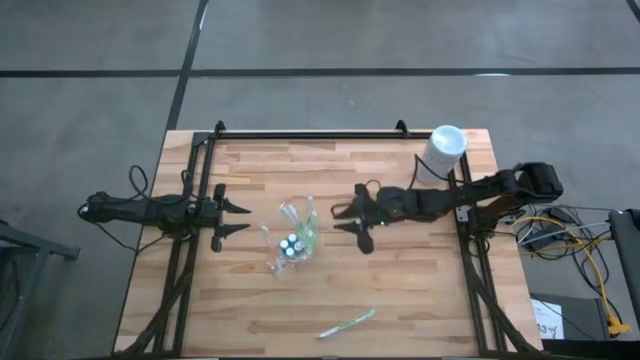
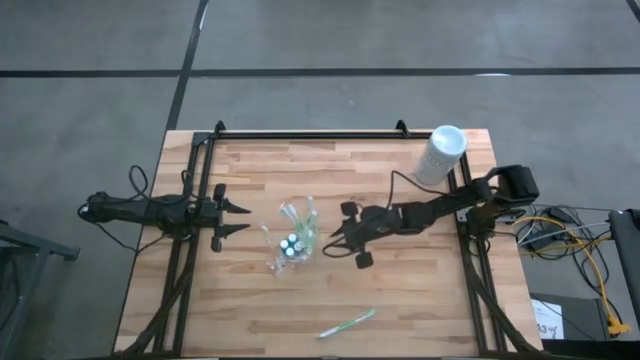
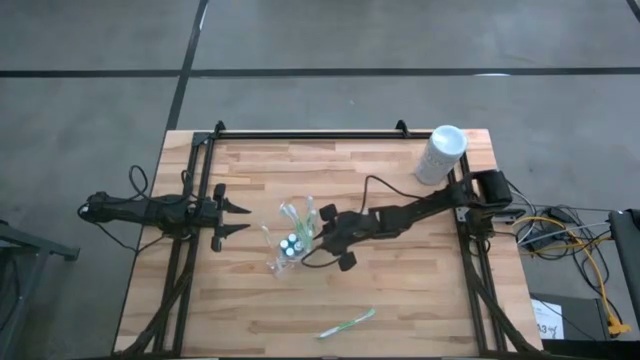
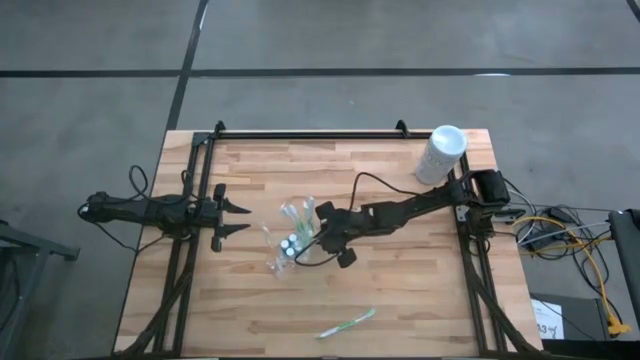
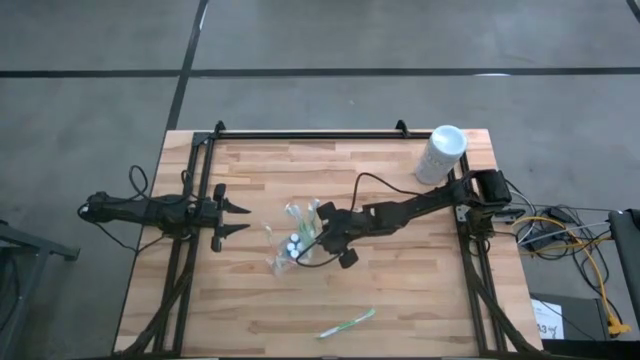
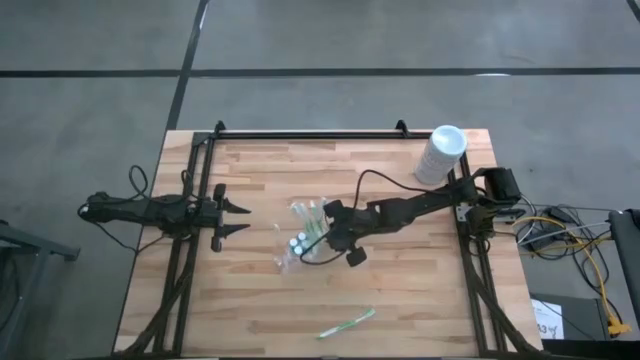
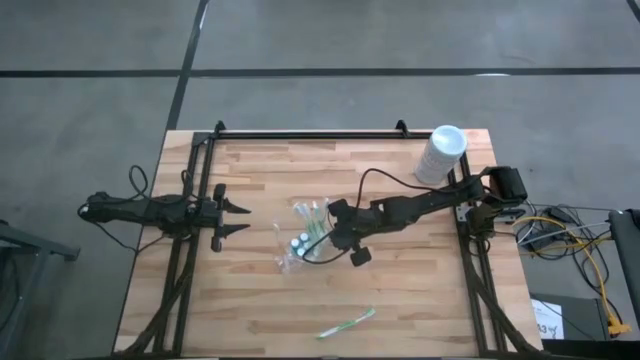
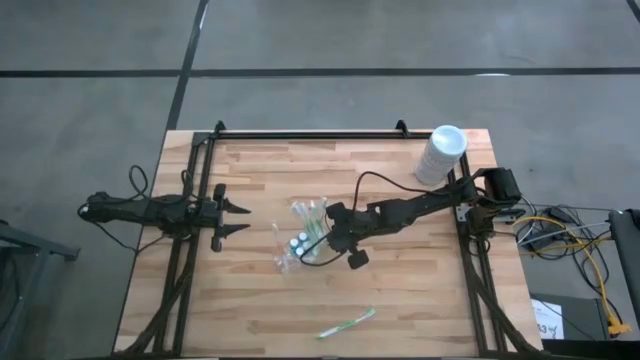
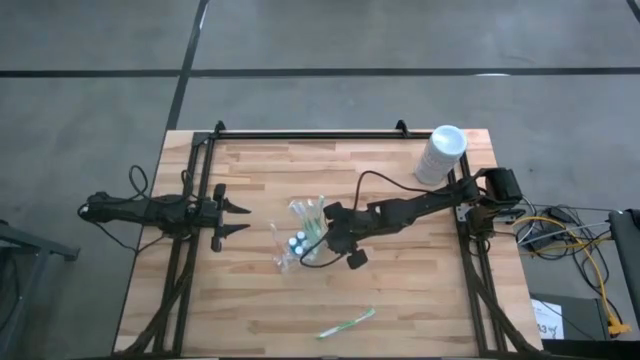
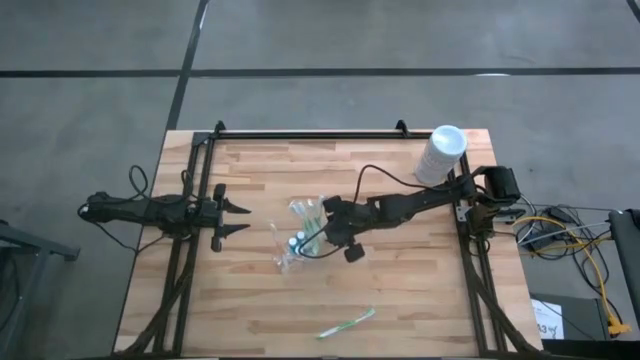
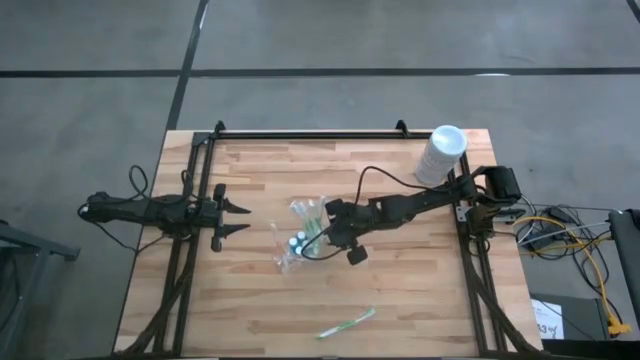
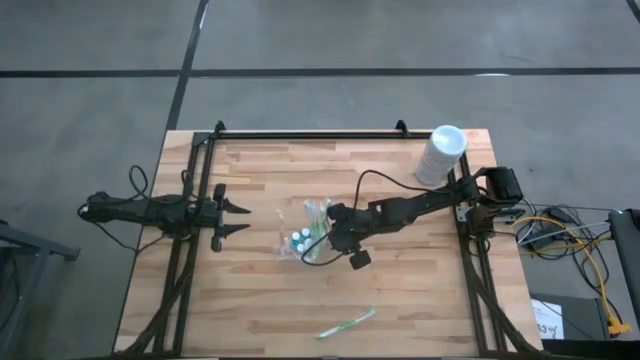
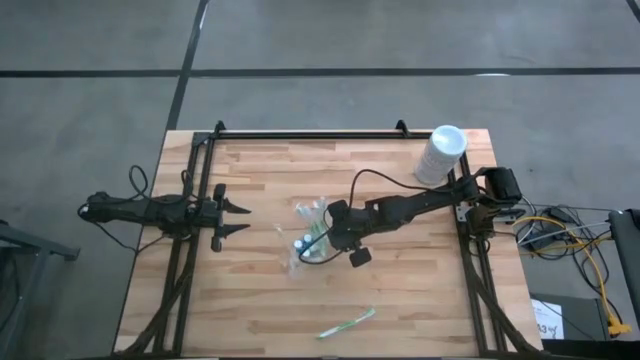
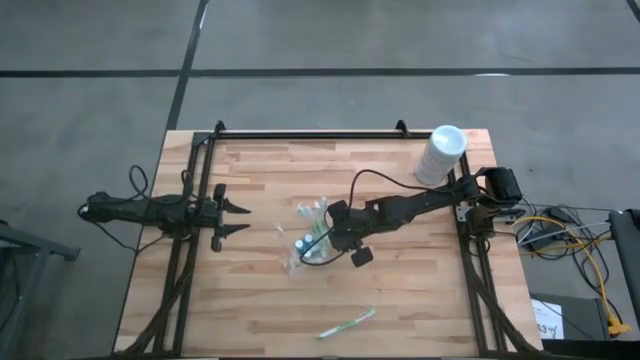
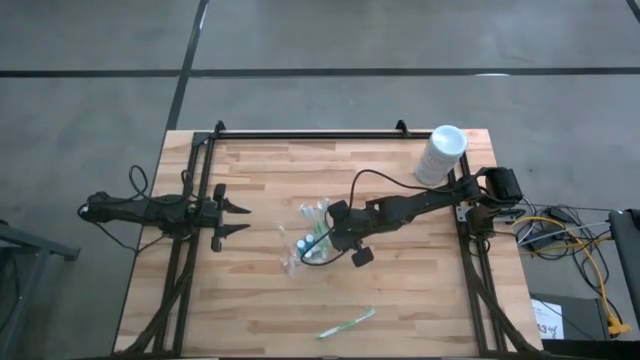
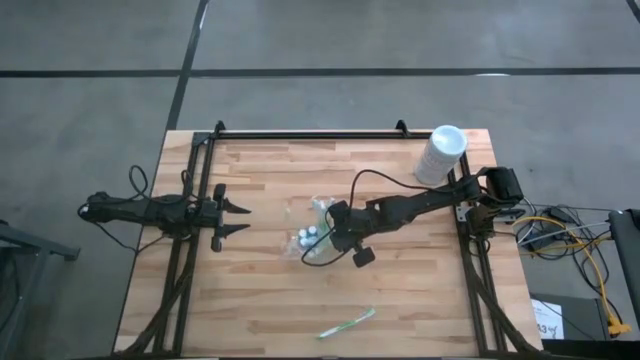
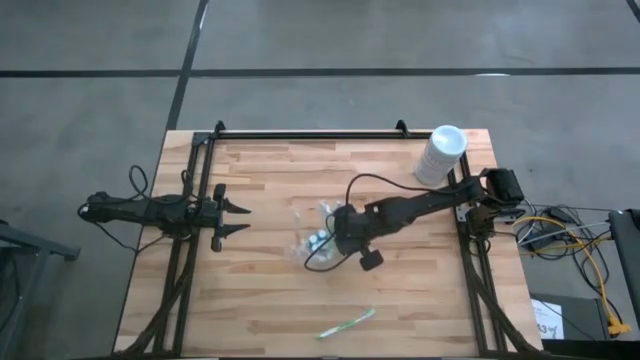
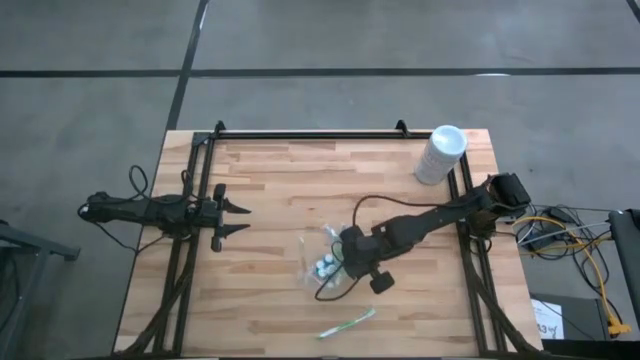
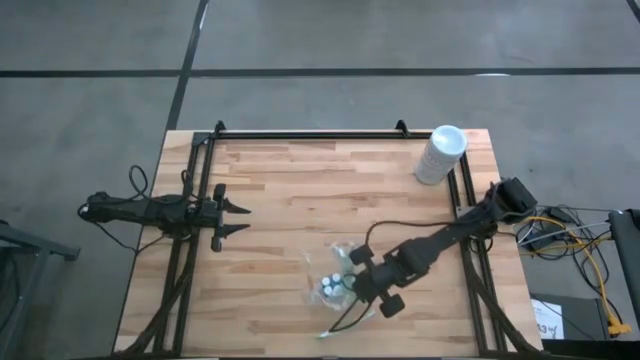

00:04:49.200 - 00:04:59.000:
Task: Pick & Place toothbrushing station
Move the transparent organizer to the bottom center of the table

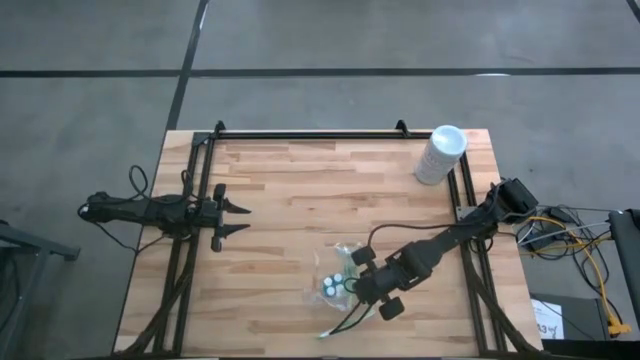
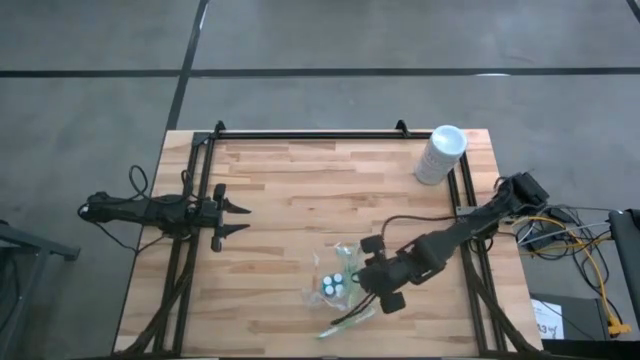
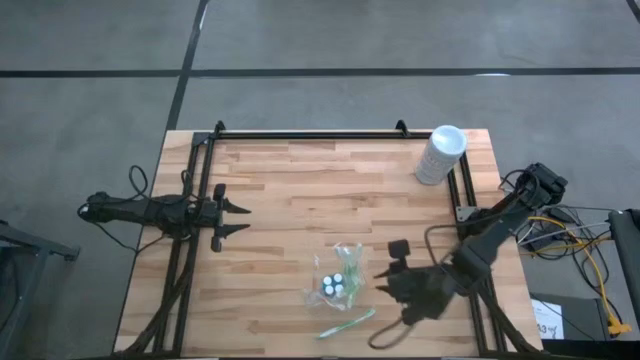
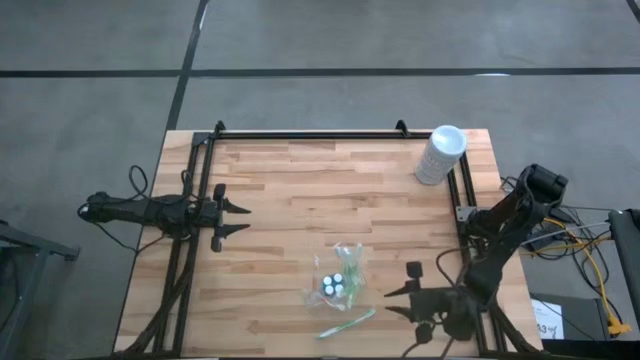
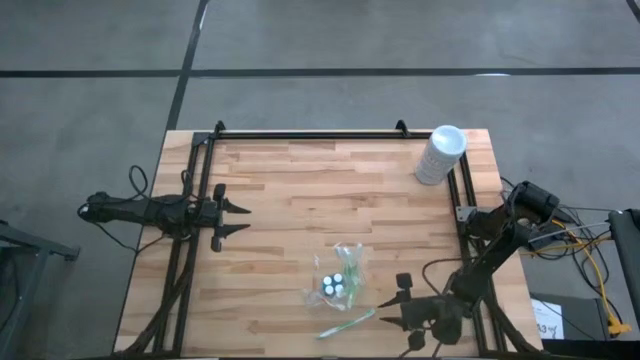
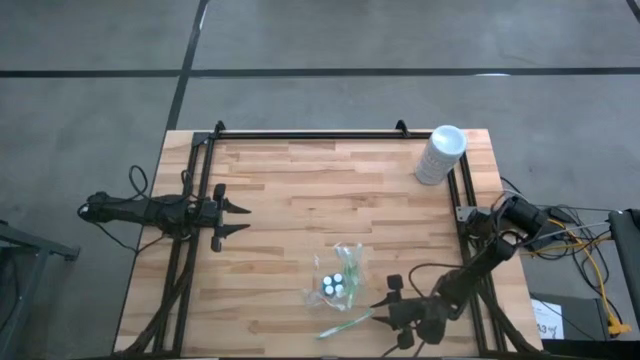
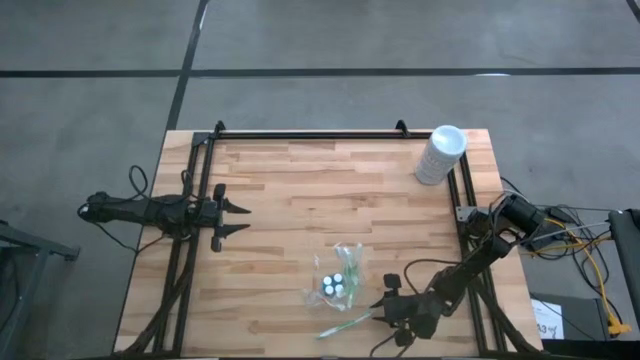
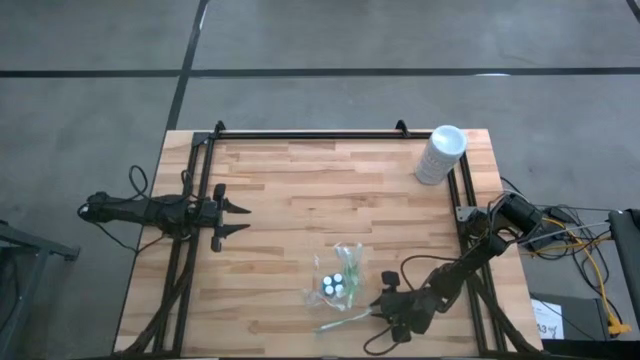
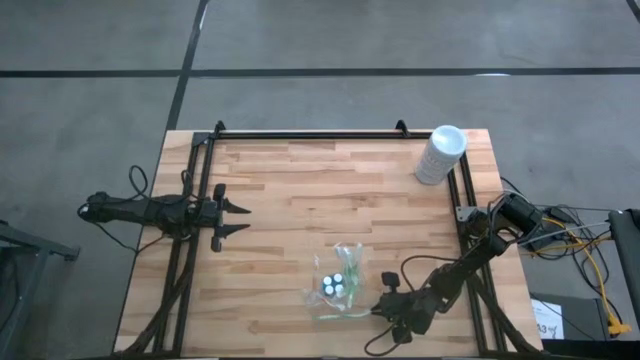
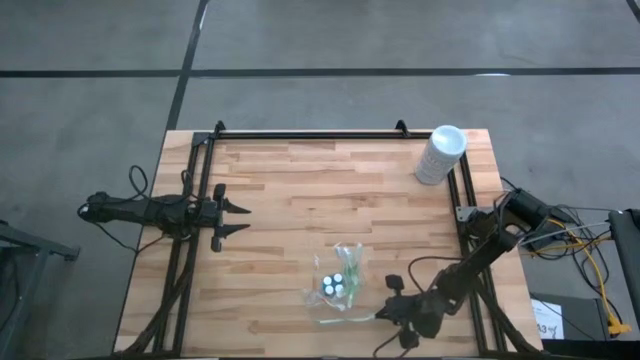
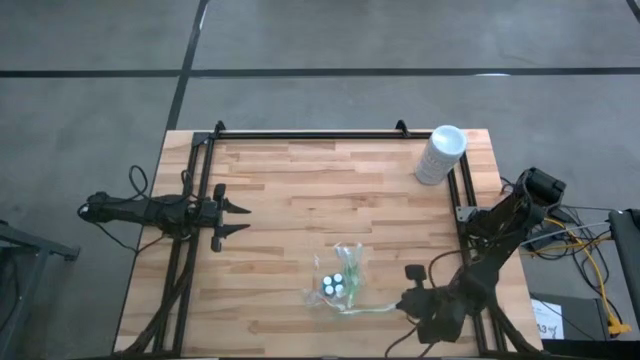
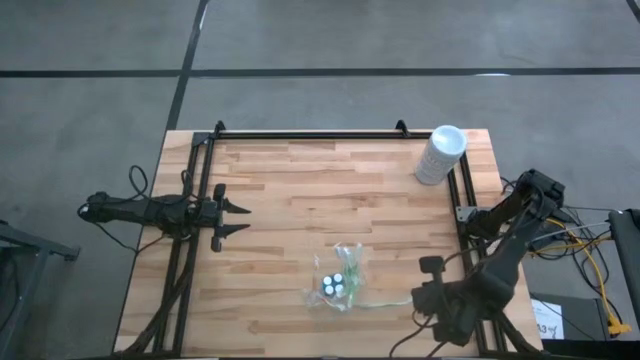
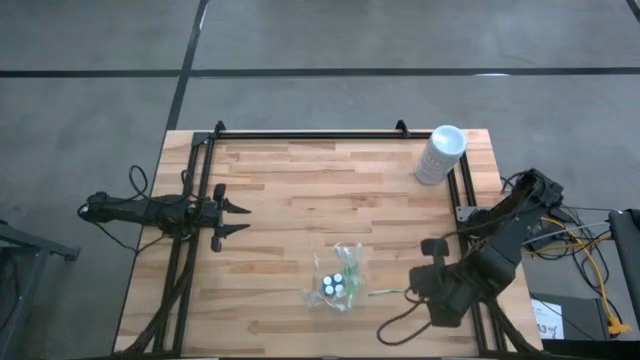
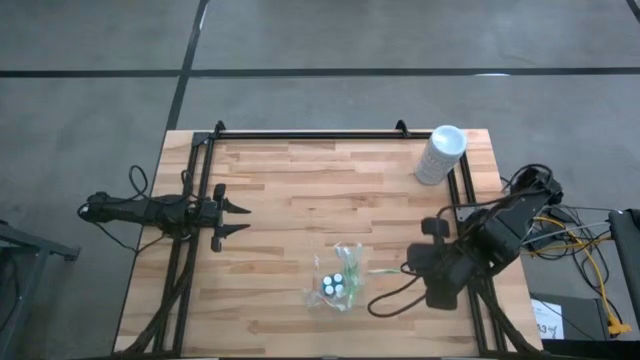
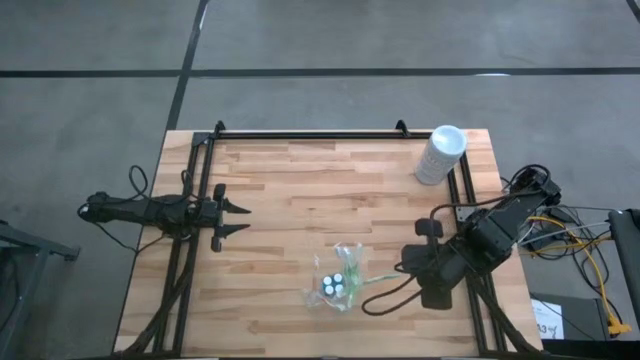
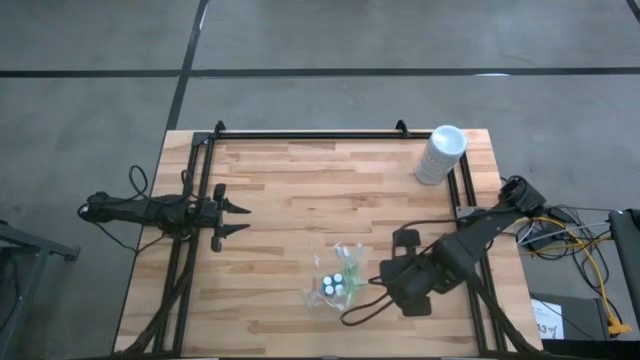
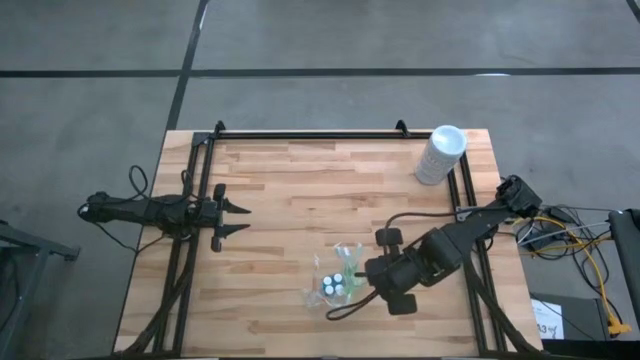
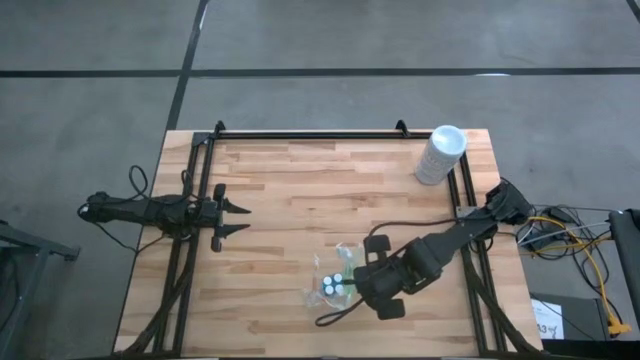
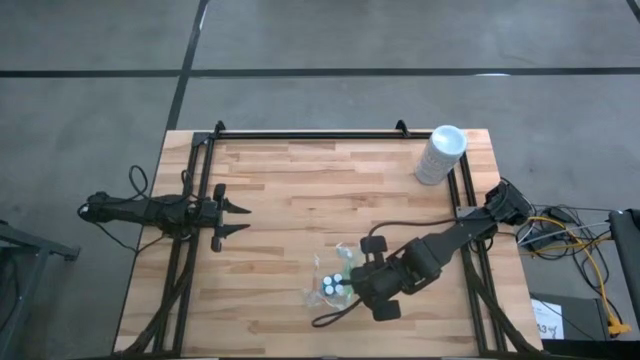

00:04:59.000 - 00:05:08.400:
Put the green toothbrush into the transparent organizer

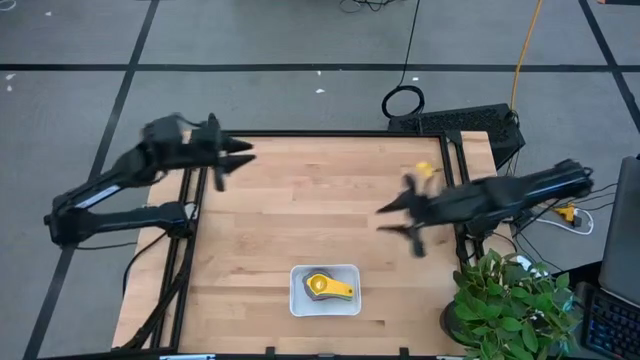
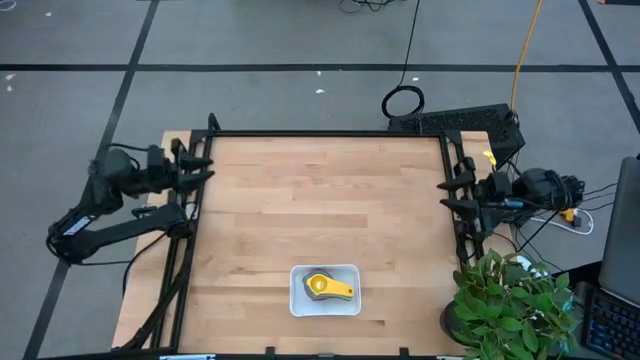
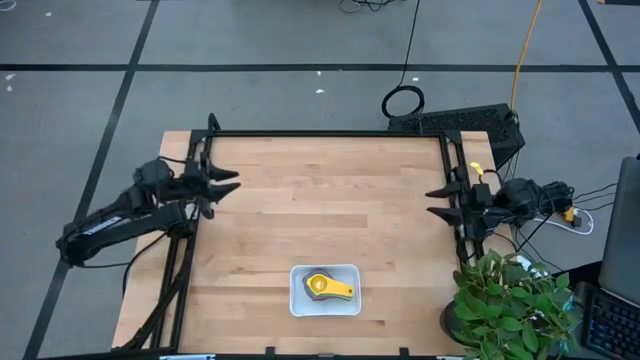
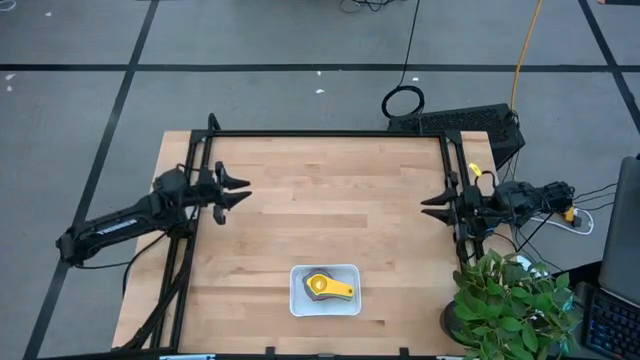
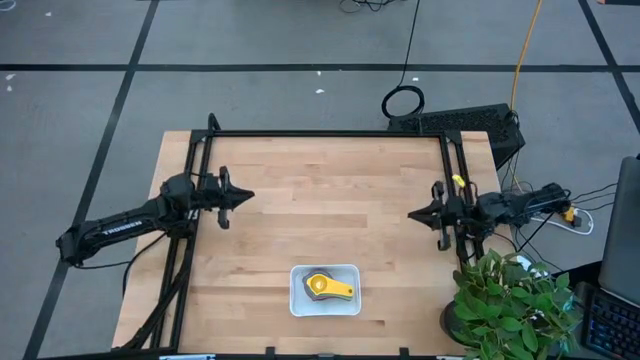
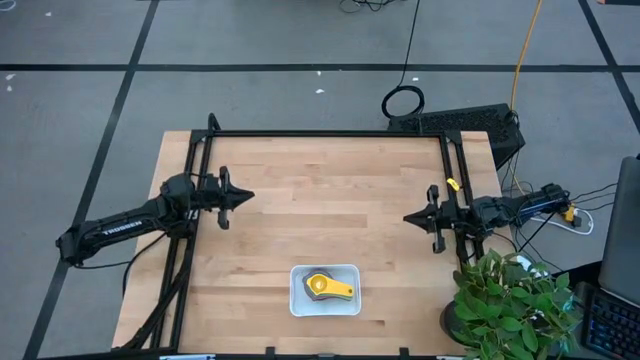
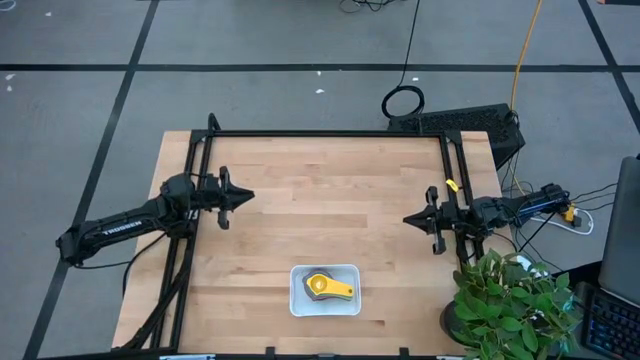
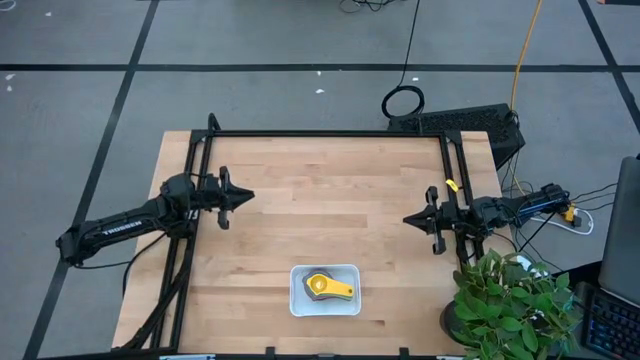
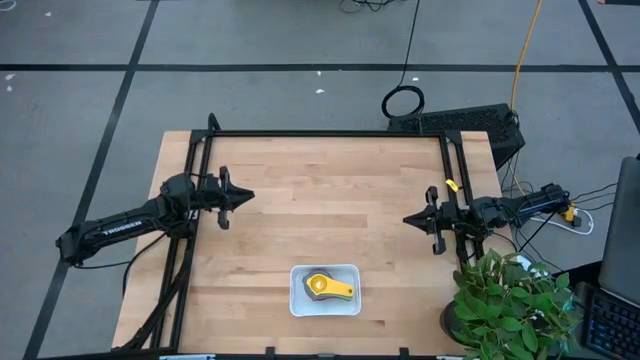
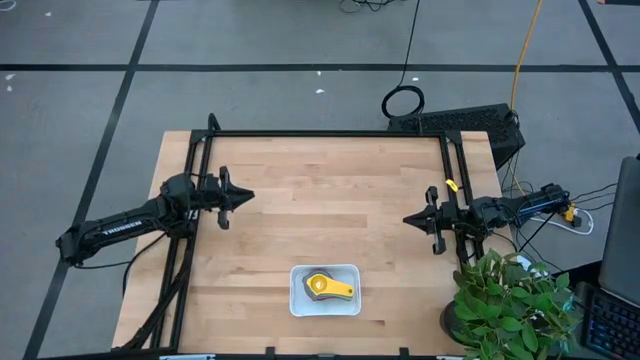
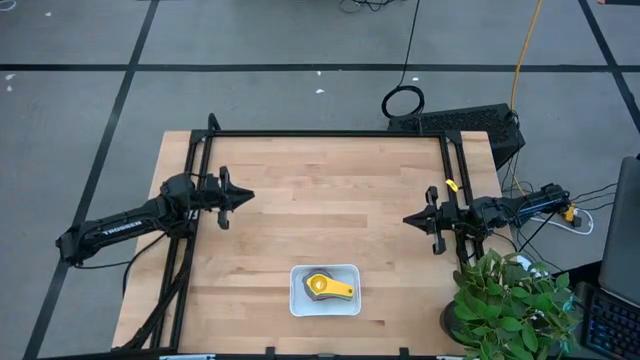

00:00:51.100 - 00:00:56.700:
Task: Nest measuring cups in basket
Return to Home Position
